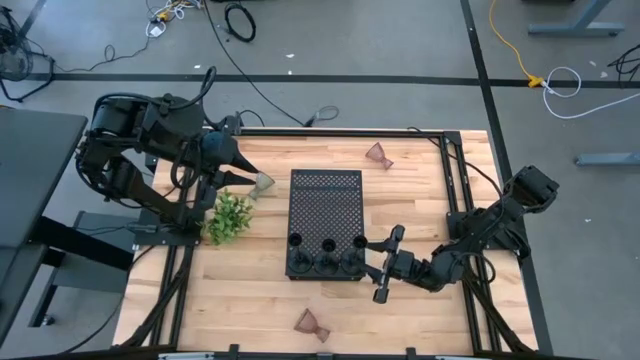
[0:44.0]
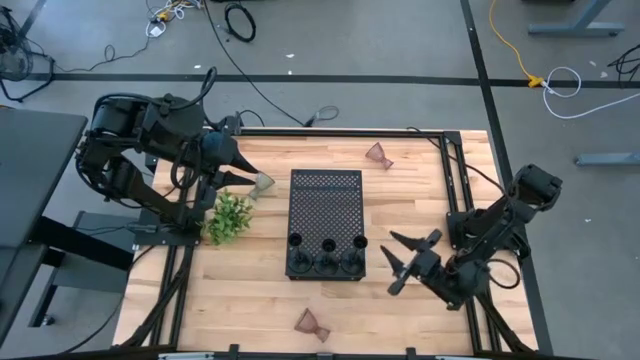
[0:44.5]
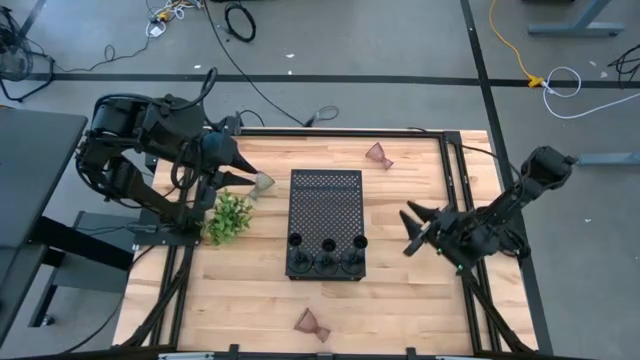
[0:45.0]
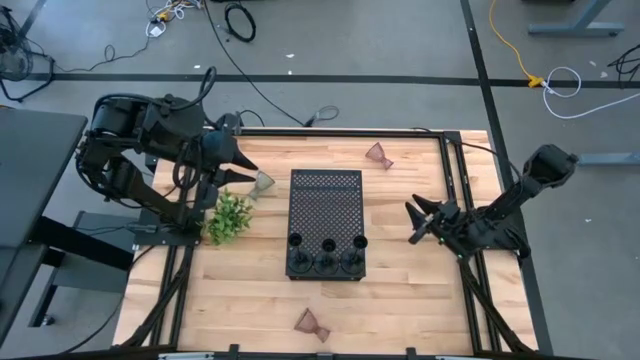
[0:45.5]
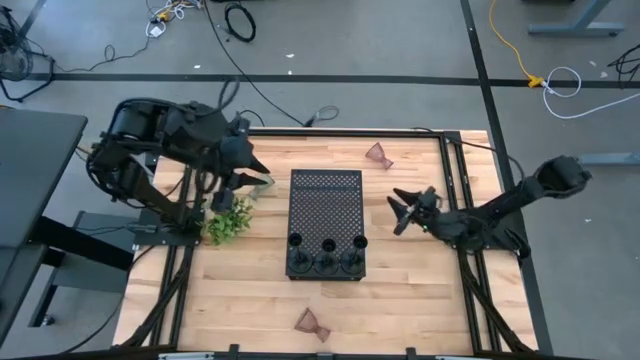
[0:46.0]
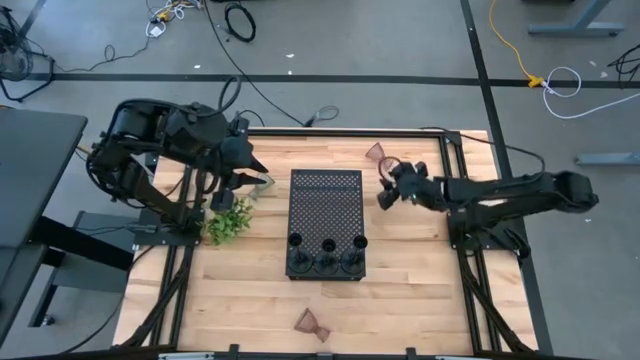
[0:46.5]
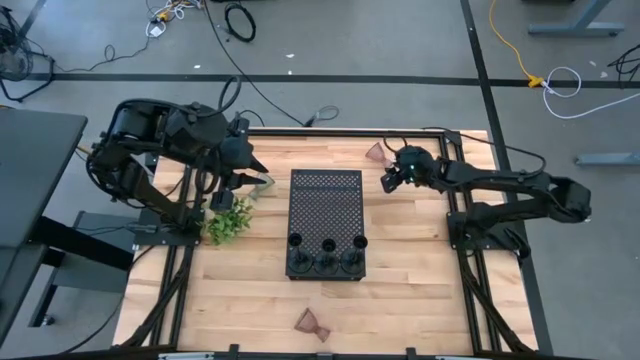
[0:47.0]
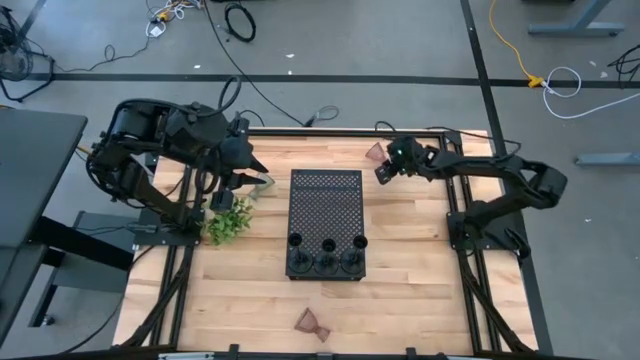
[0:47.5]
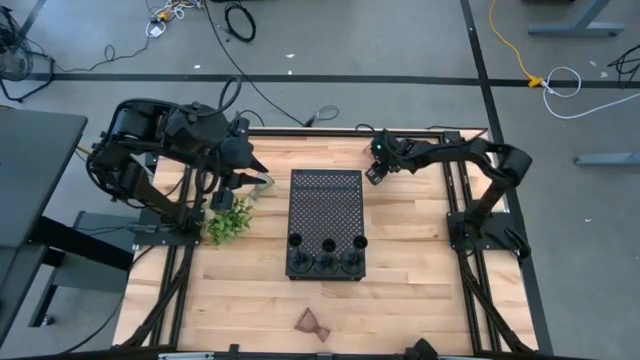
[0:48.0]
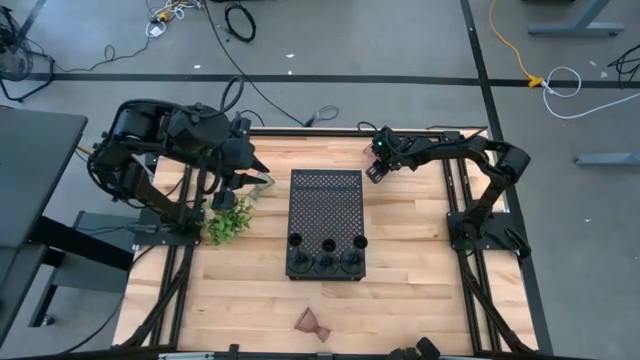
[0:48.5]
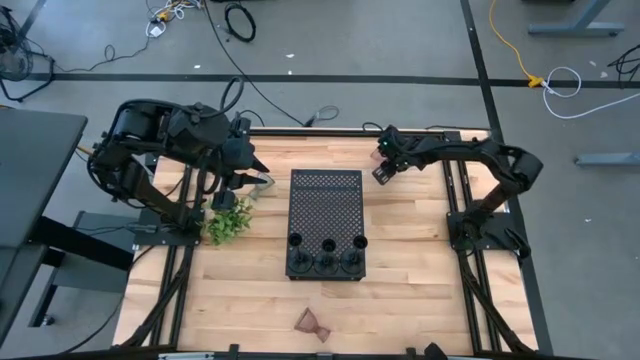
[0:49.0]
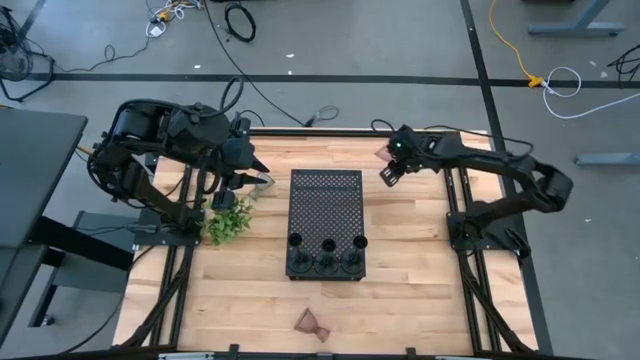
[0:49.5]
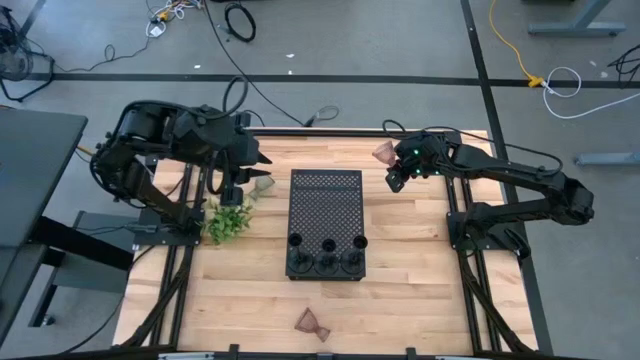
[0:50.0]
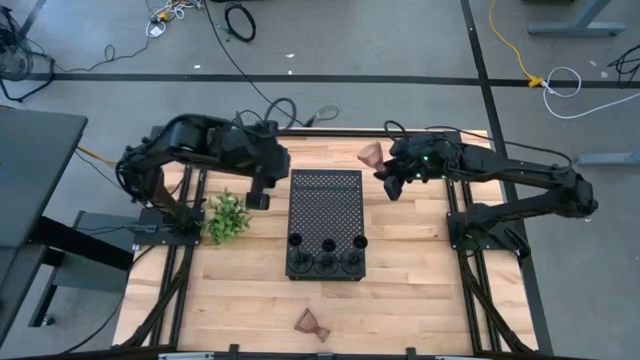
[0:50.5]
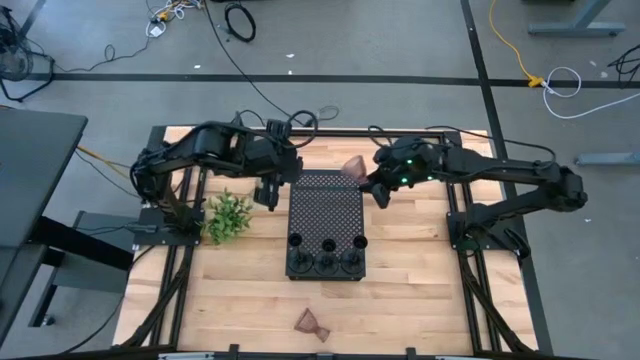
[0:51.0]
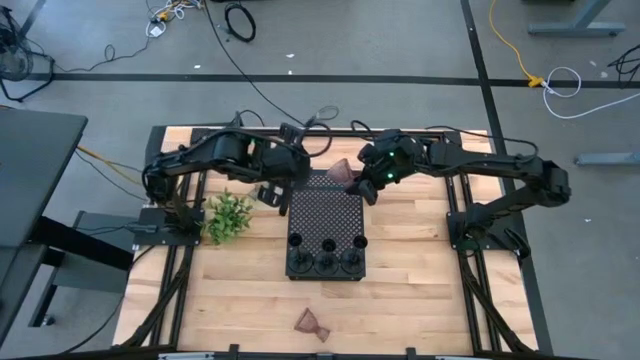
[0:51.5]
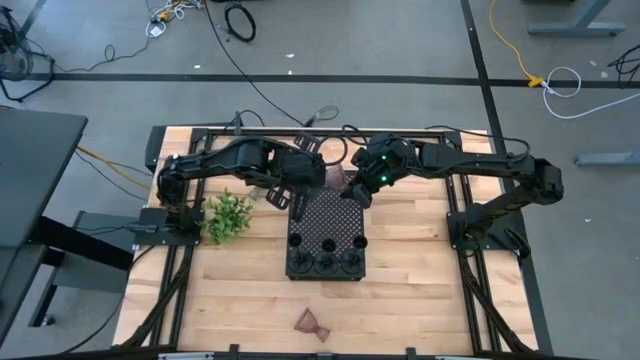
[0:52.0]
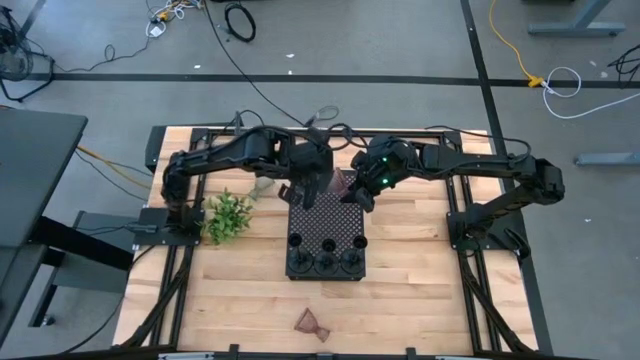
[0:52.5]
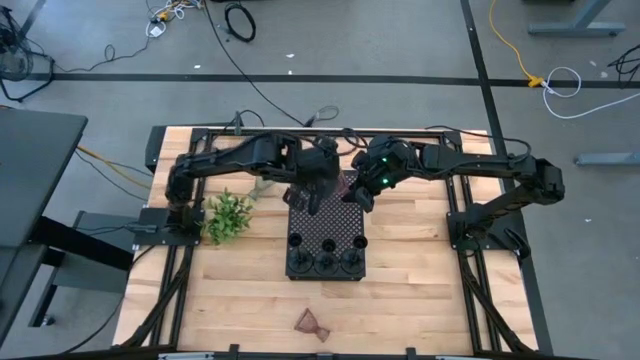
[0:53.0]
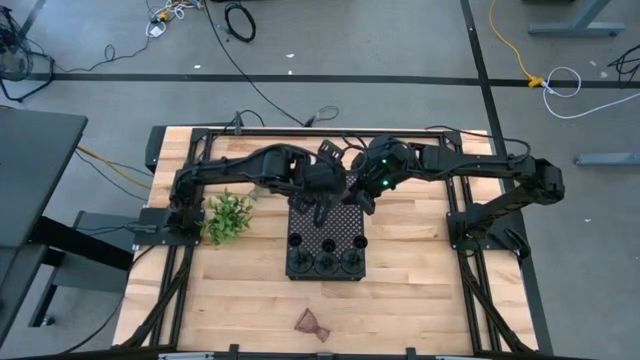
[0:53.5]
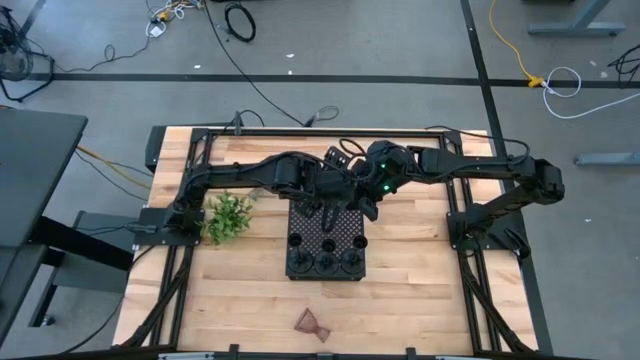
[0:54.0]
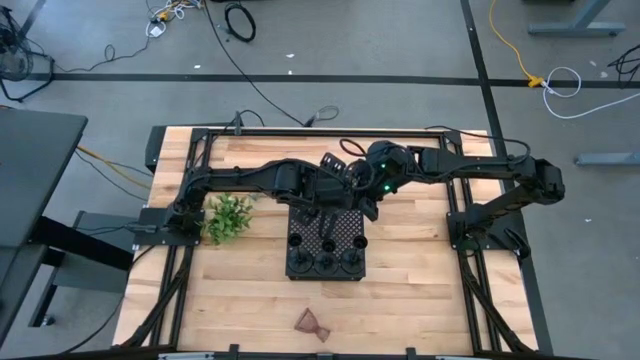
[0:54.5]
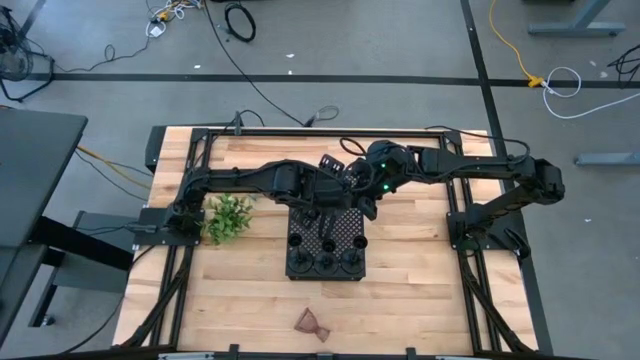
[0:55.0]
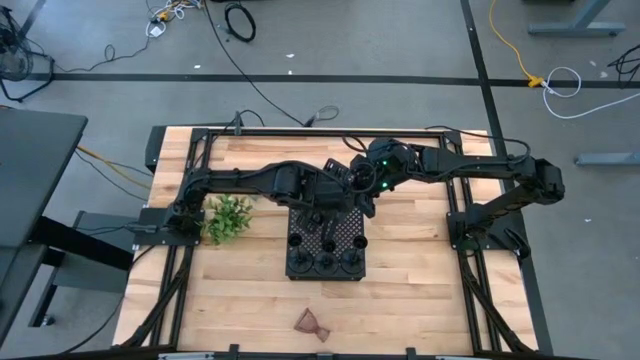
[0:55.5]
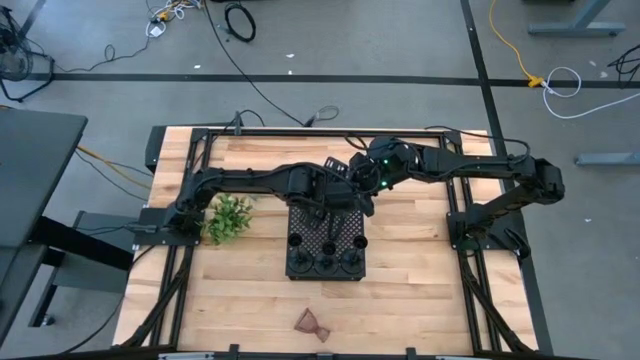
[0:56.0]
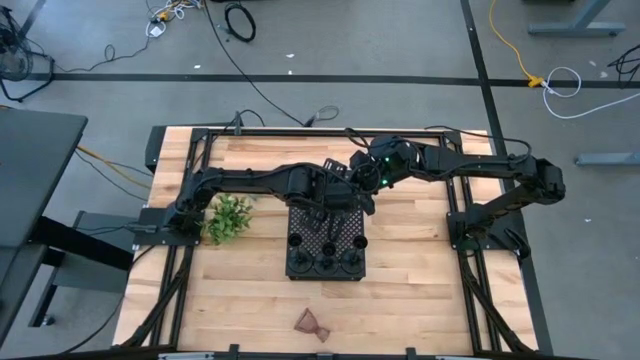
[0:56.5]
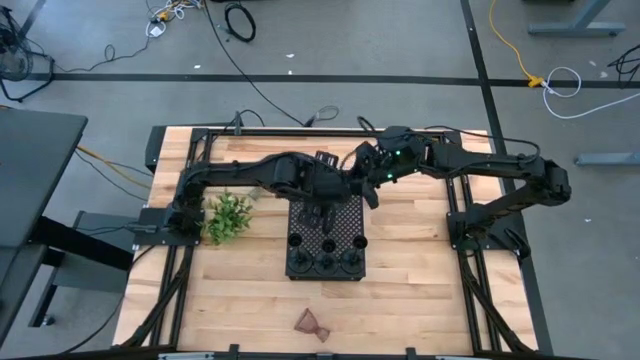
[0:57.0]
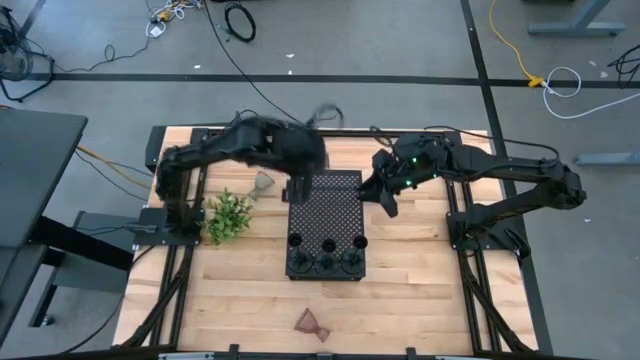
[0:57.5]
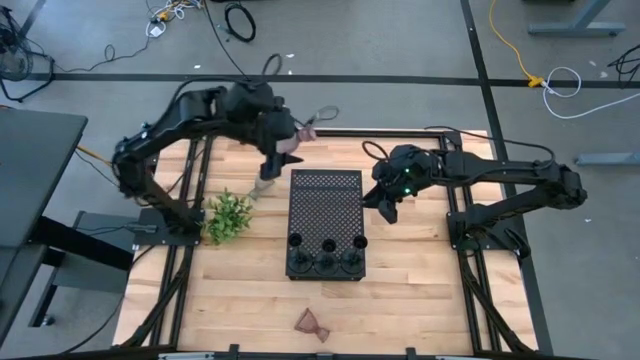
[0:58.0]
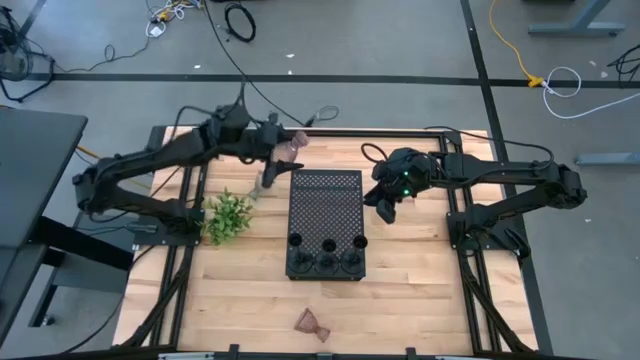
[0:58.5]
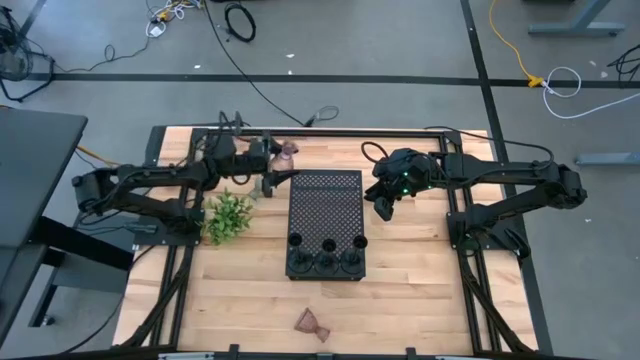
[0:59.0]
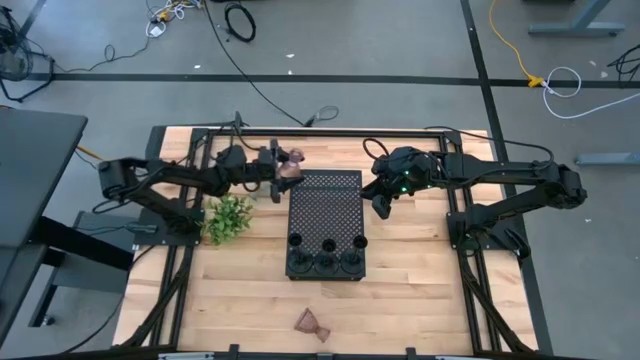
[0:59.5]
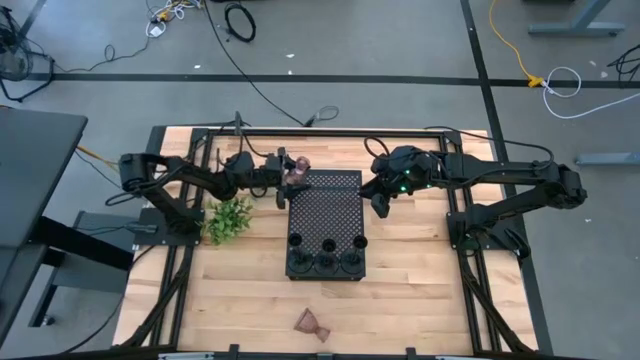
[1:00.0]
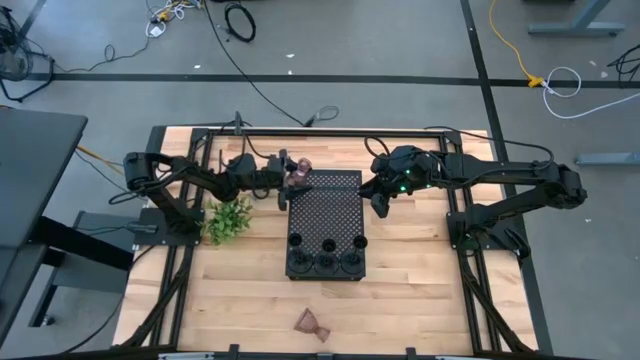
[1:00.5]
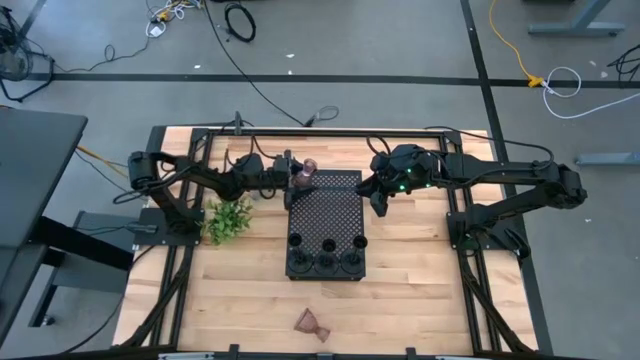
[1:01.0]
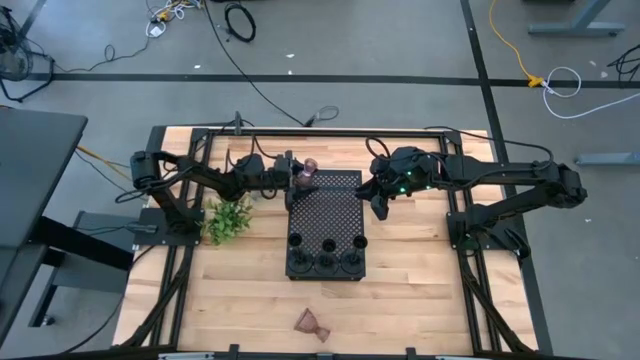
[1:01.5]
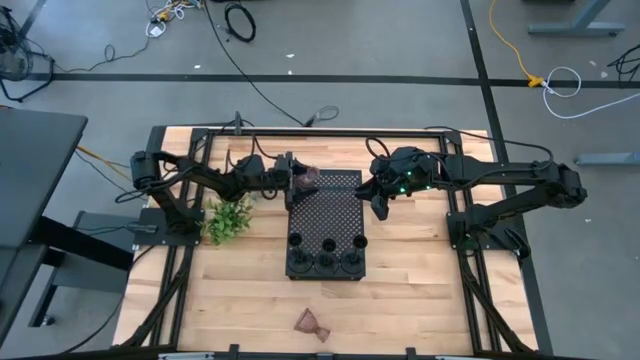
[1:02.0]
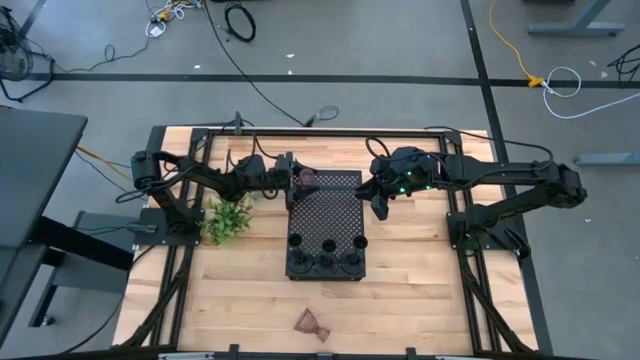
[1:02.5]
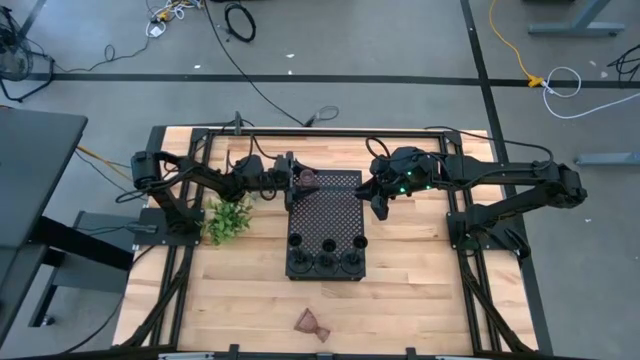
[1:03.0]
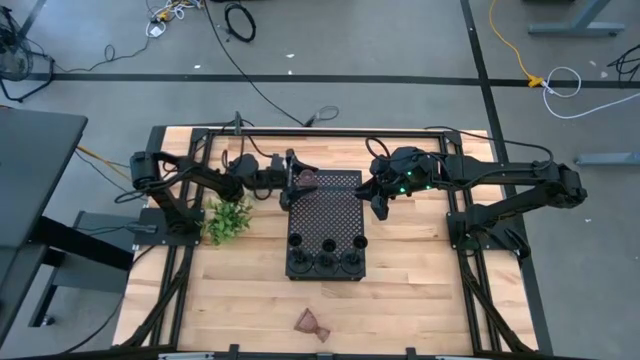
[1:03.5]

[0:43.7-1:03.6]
Task: Pick & Place candle stick holders
Put the top pink glass candle holder on the shelf

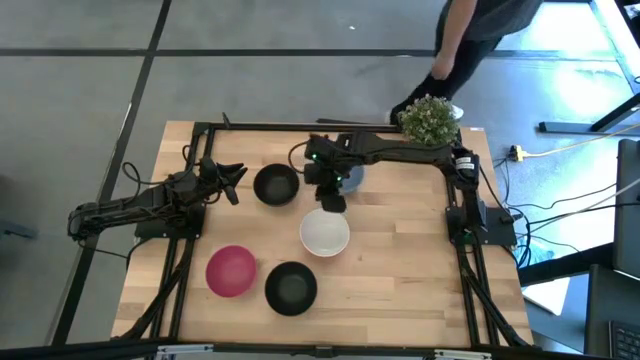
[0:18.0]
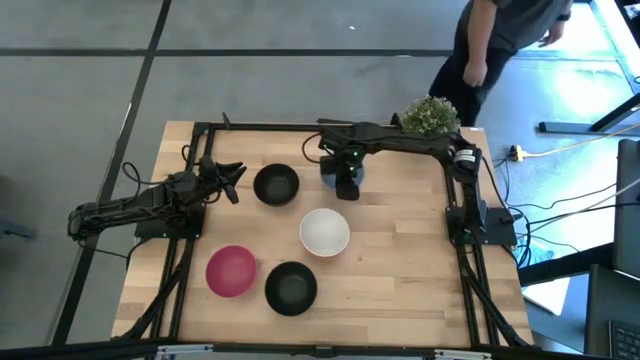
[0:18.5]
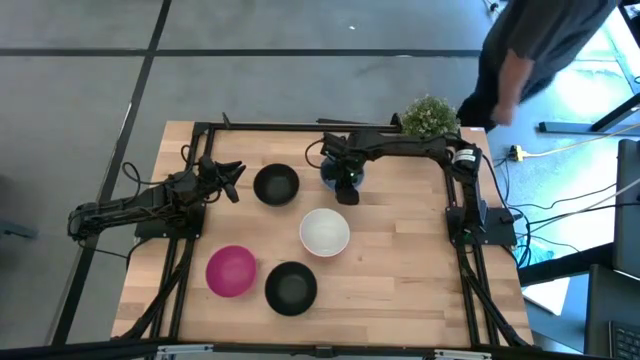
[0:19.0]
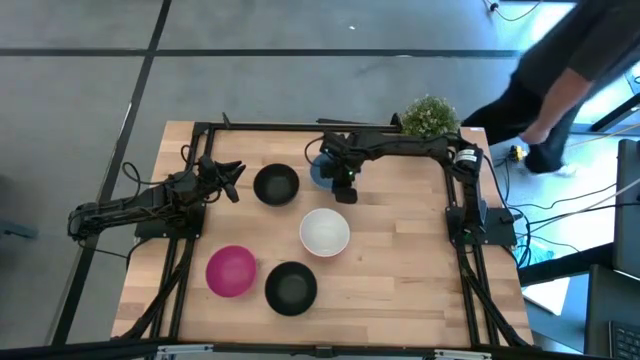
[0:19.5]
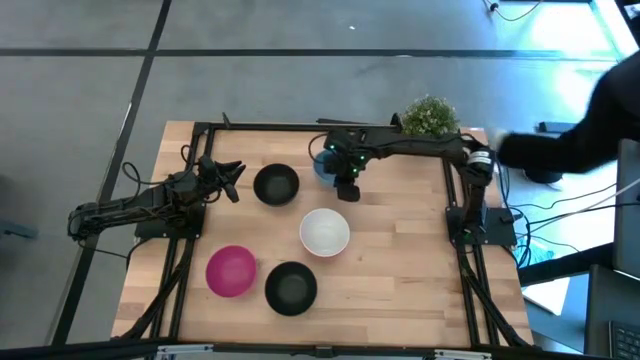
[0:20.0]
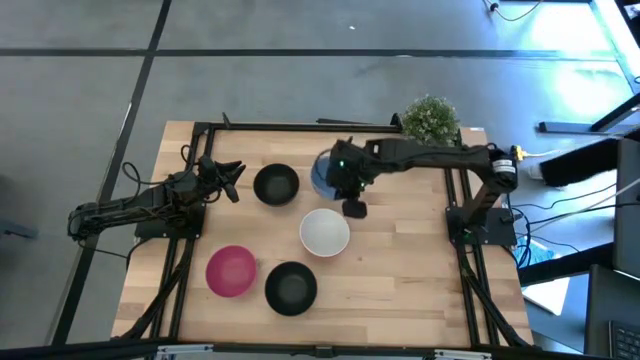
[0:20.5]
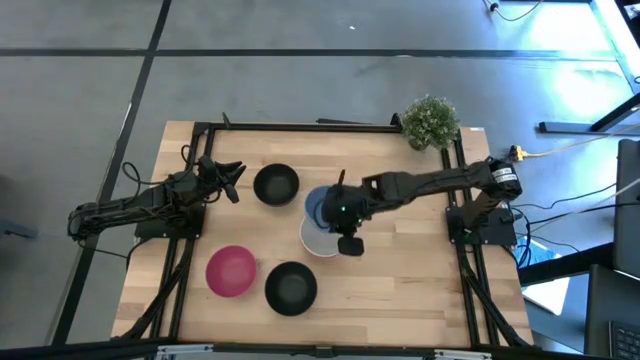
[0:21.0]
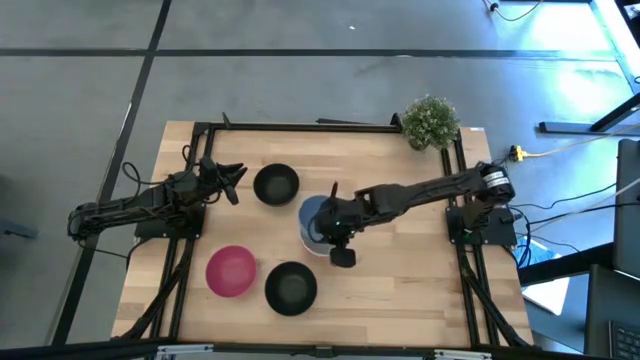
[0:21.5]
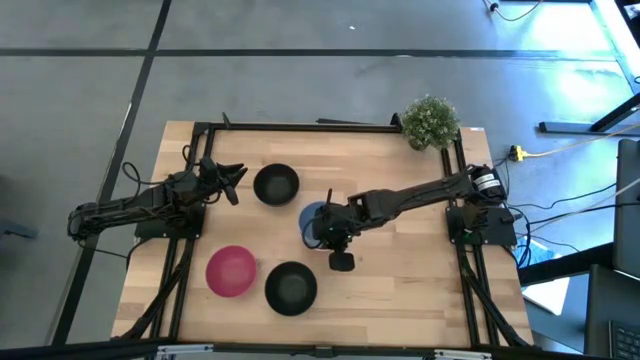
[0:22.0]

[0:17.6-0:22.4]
Task: Nest bowls inside each other
Stack the blue bowl on top of the white bowl
